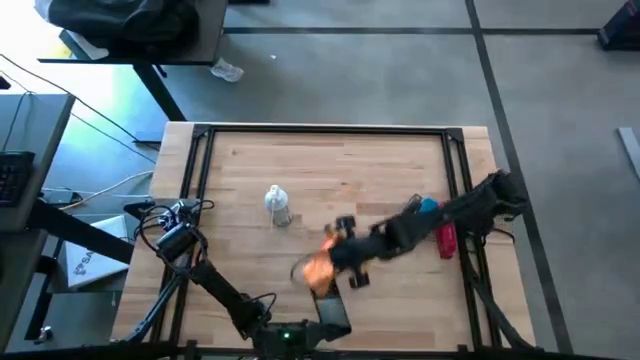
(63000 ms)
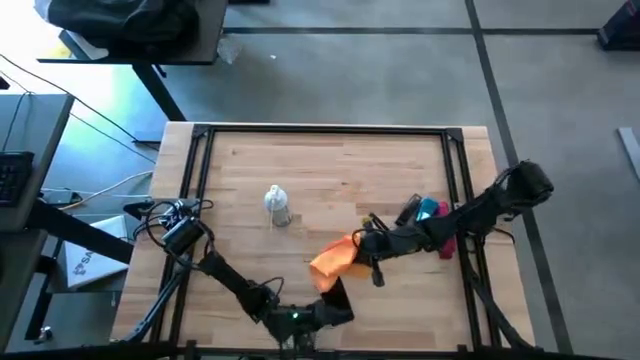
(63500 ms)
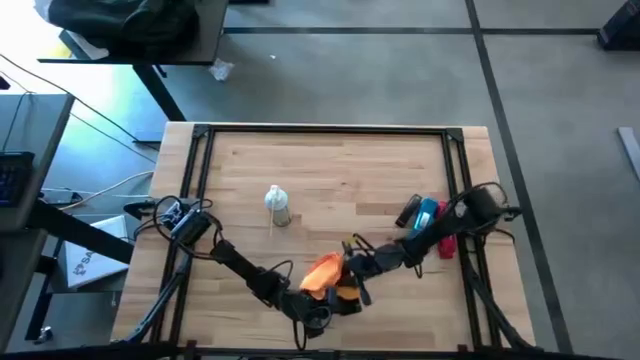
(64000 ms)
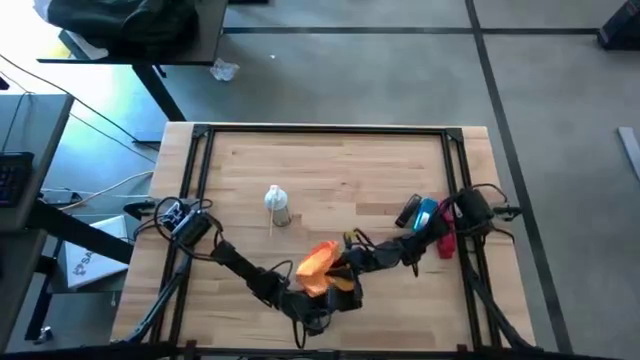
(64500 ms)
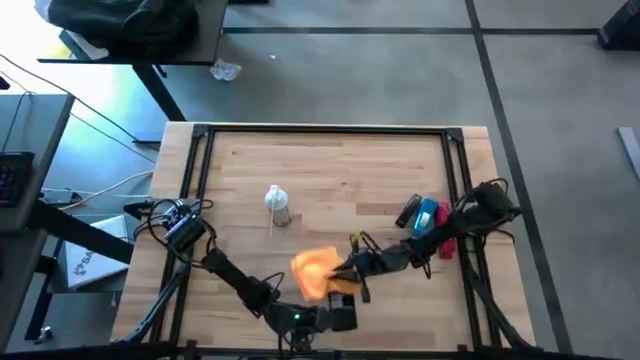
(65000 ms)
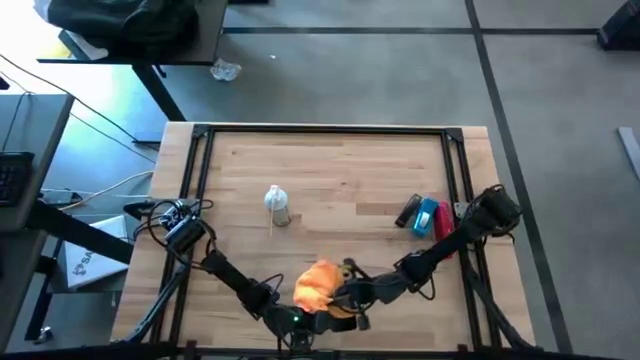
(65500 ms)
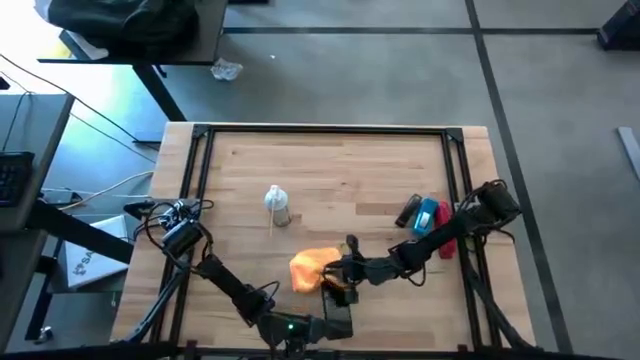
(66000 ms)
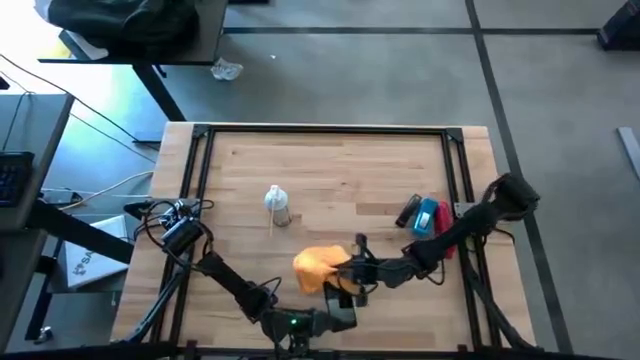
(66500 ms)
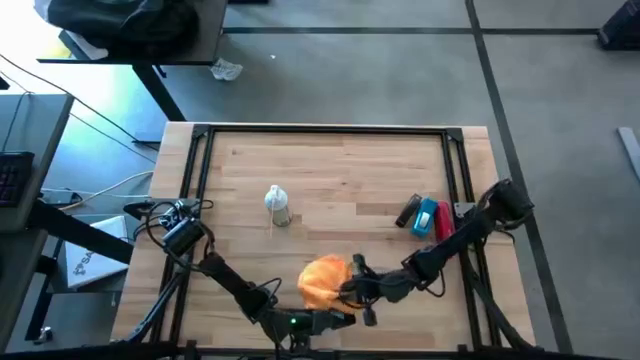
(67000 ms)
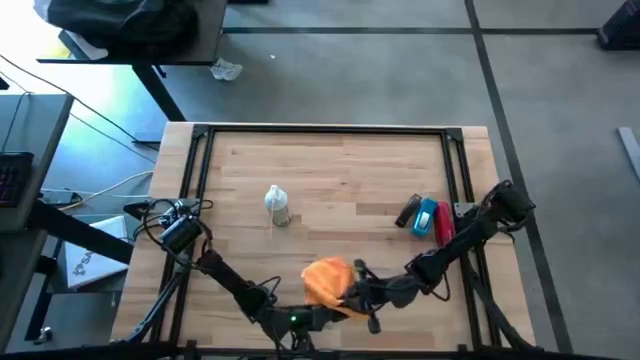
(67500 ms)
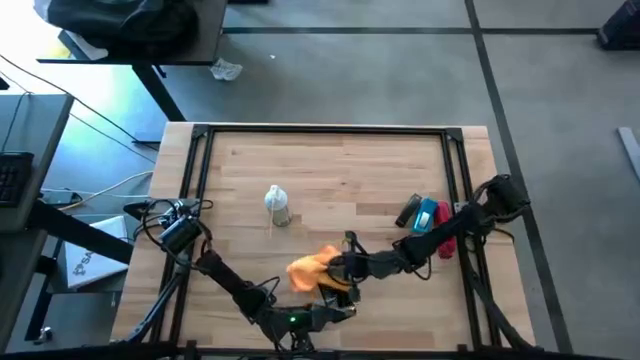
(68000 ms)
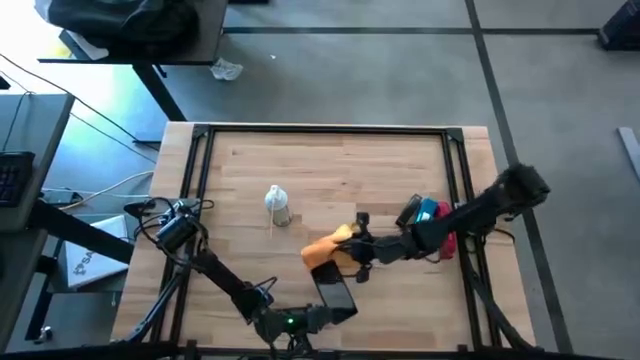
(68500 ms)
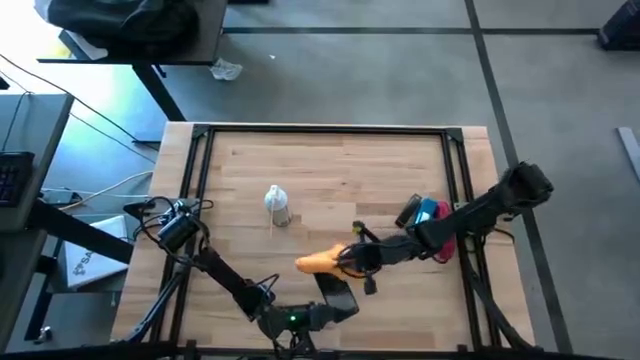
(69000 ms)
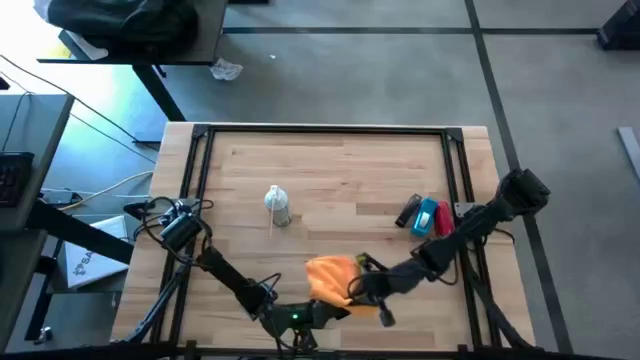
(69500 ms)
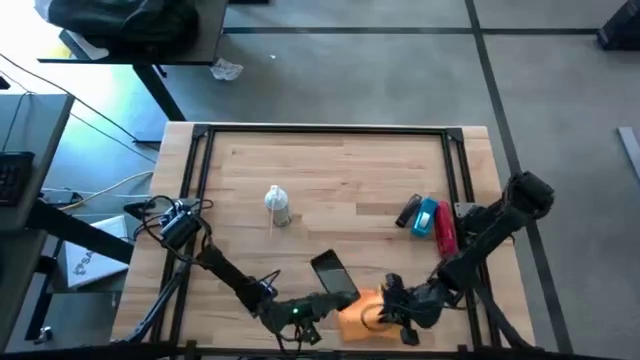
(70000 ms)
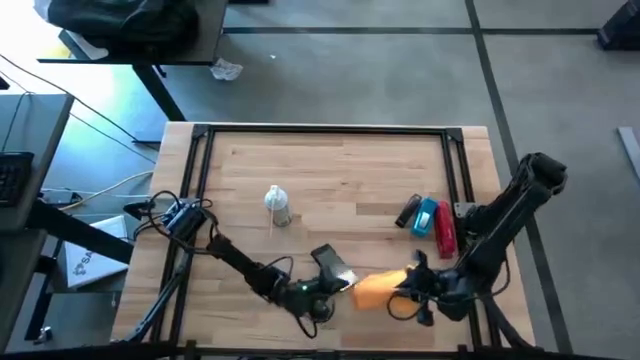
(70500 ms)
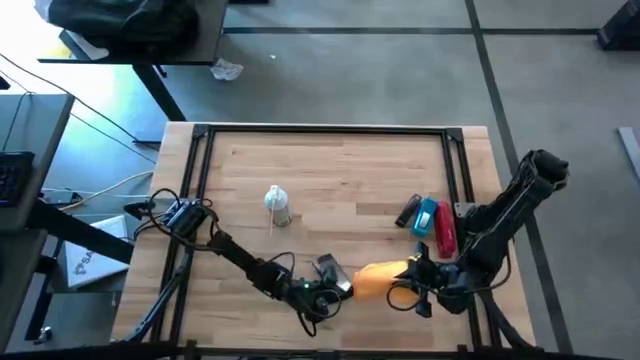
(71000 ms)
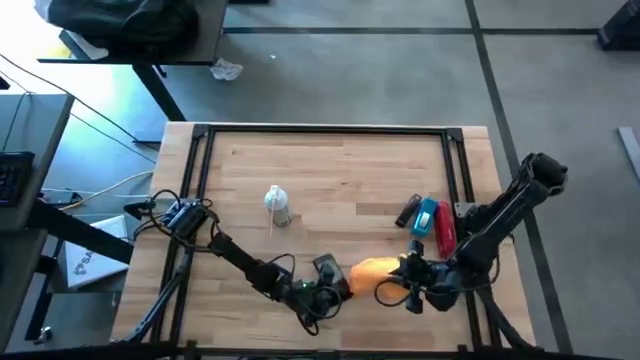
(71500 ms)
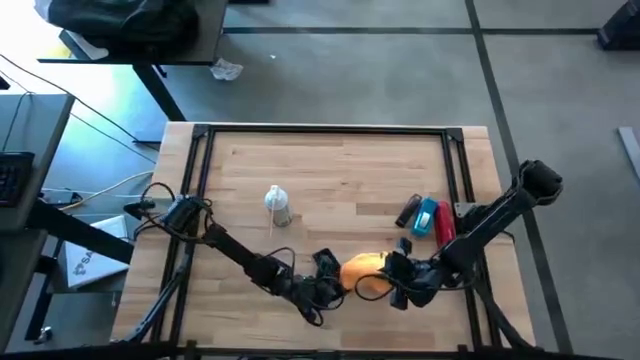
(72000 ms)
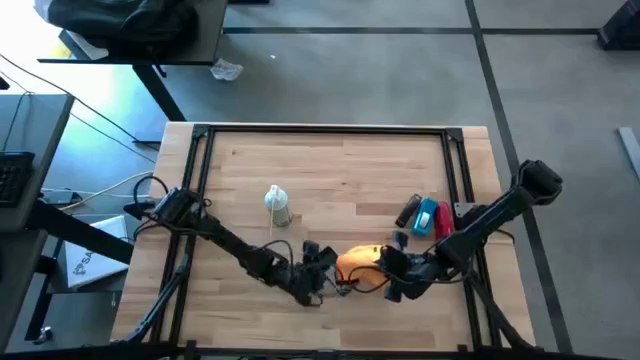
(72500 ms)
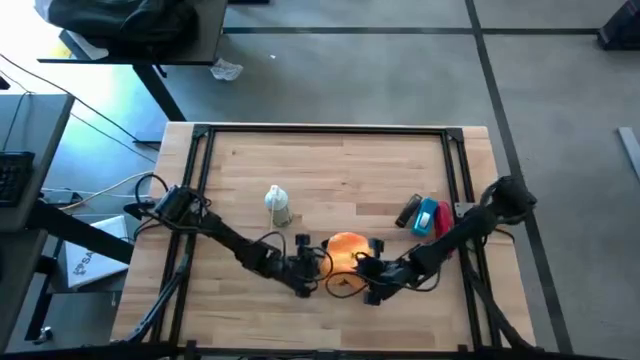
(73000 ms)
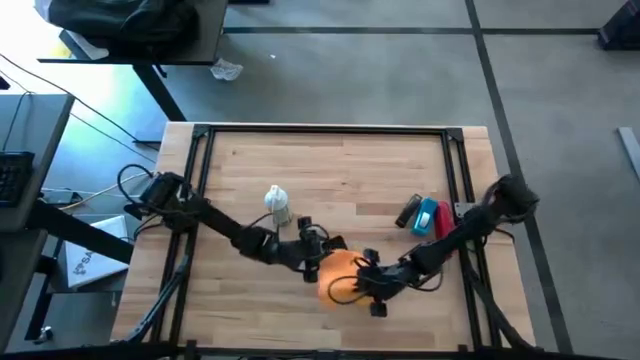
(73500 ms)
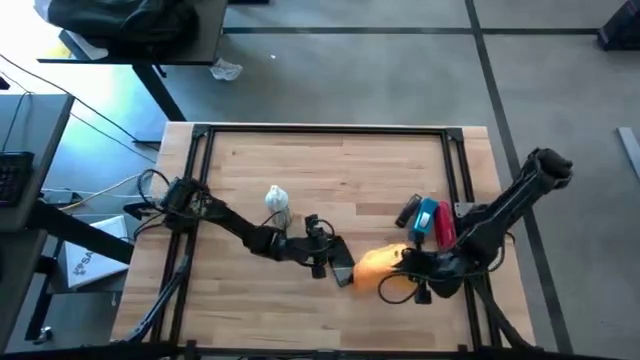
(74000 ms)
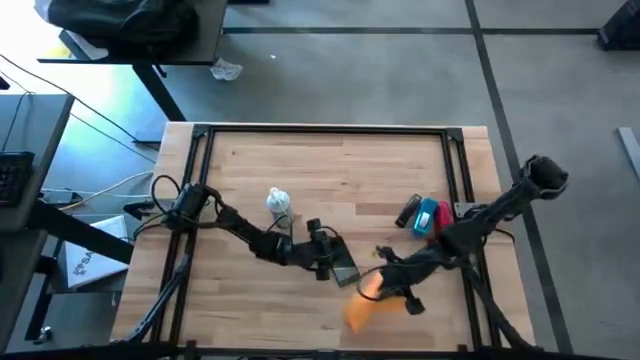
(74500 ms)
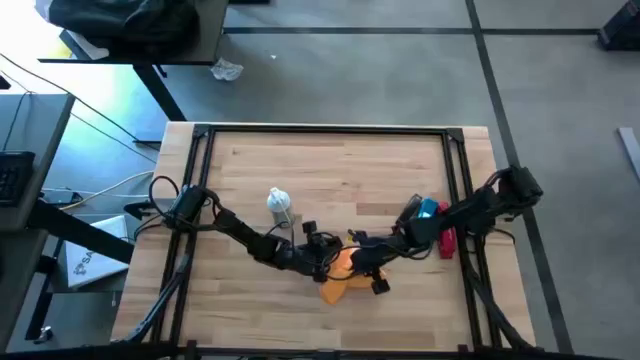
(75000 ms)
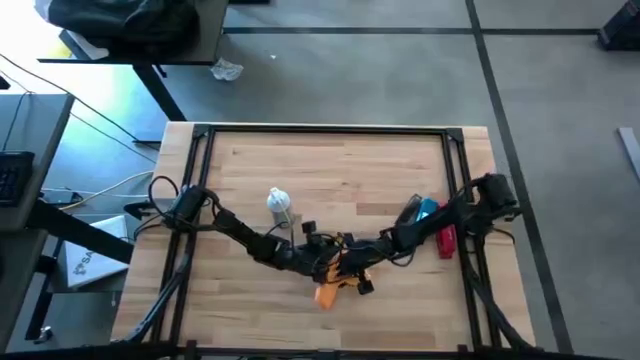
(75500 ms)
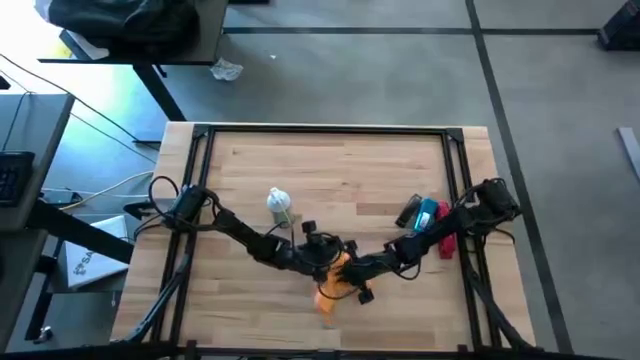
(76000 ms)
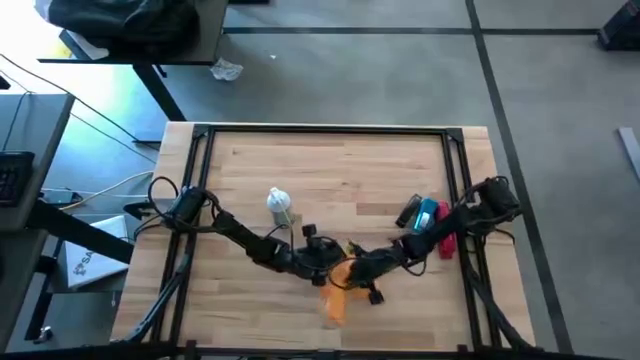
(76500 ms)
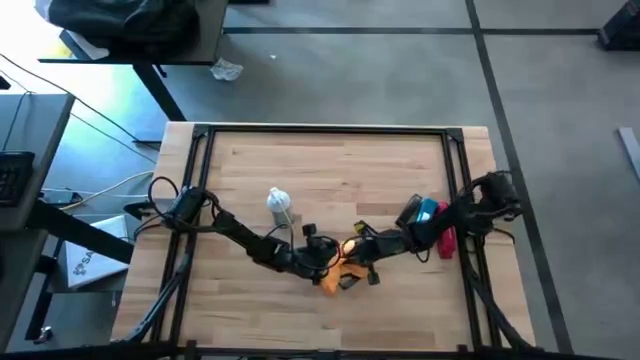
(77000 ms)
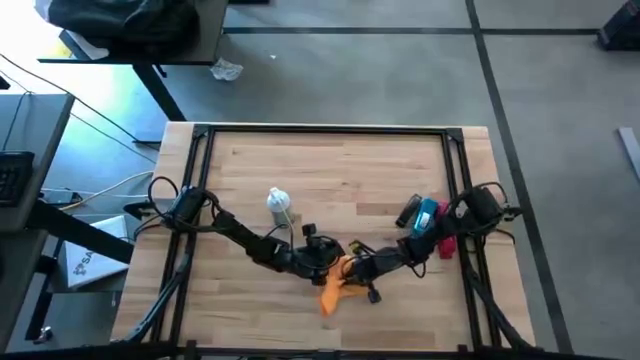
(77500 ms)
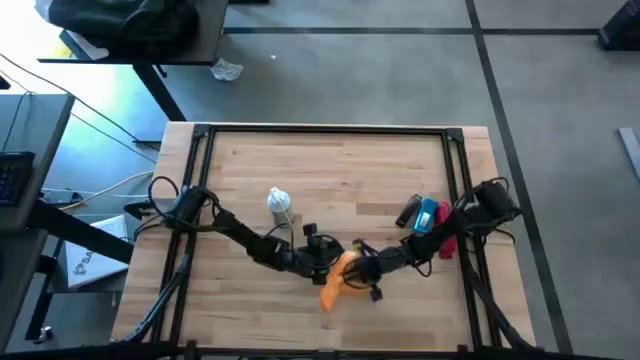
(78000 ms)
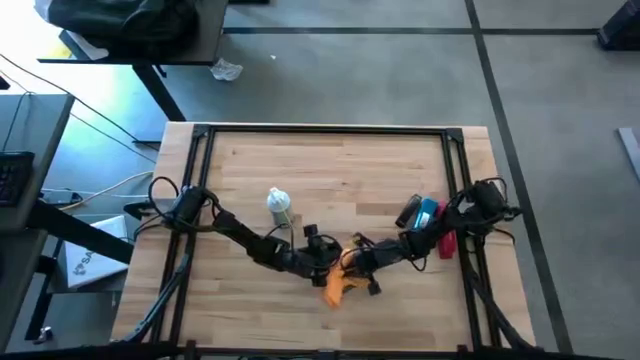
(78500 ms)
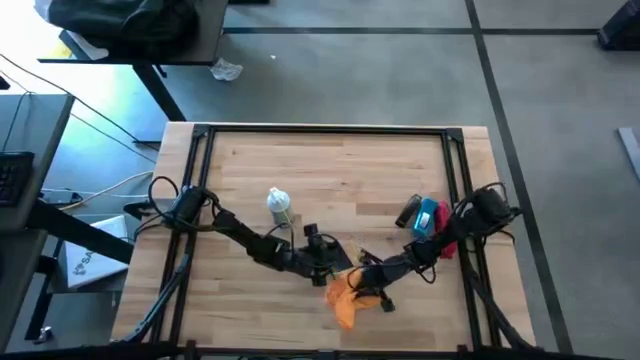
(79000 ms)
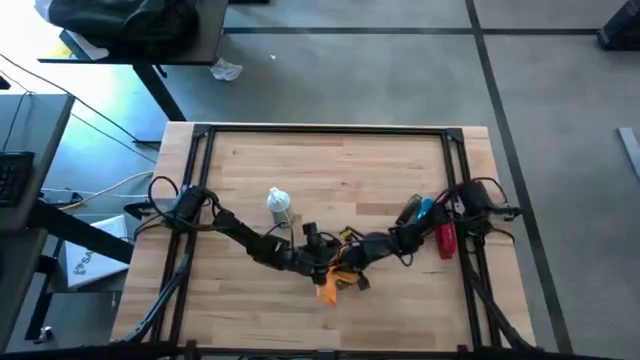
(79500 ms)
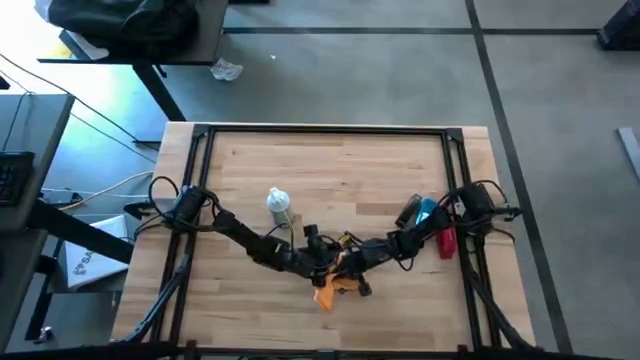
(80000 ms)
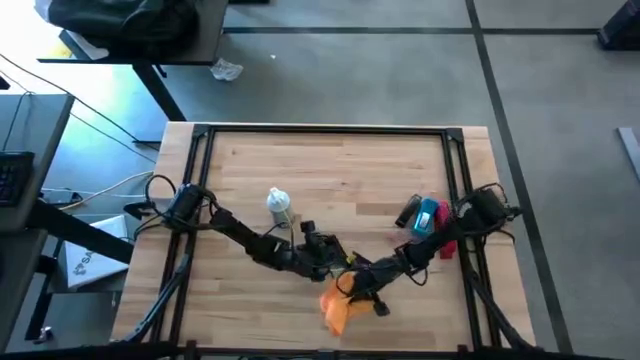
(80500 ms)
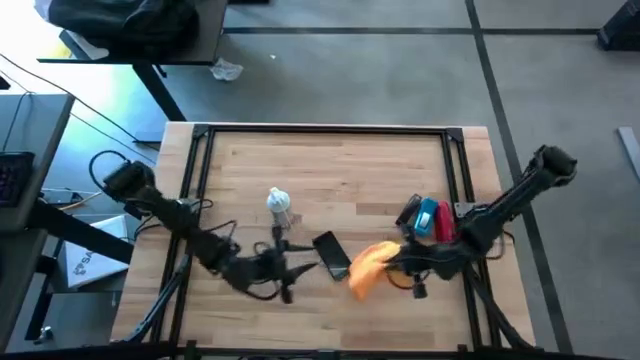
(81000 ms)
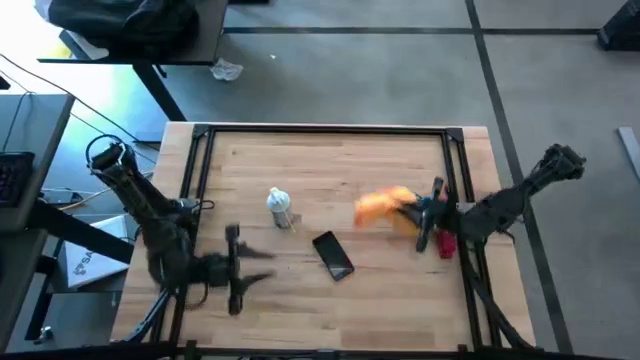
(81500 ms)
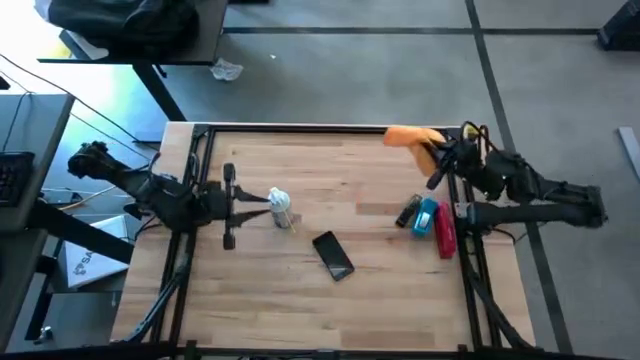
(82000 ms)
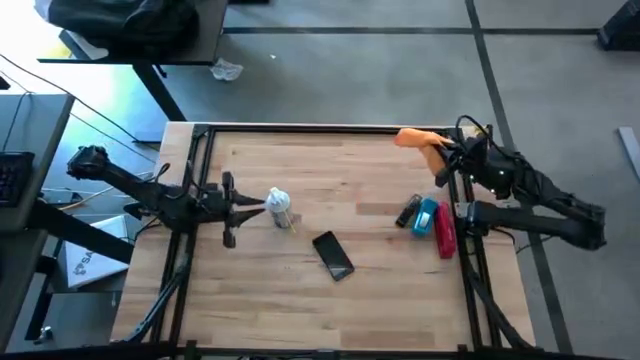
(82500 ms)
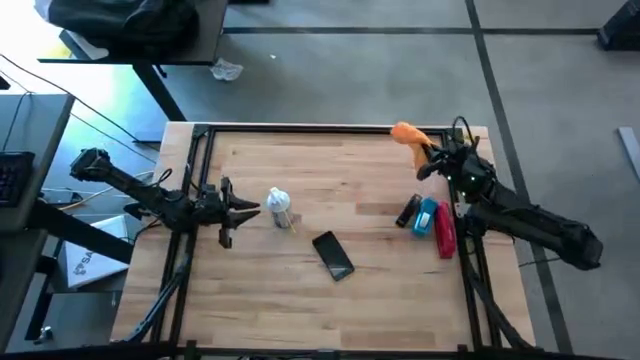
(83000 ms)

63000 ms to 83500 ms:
Task: Apply microfiber cloth
Wipe the black cellphone with a microfiber cloth
